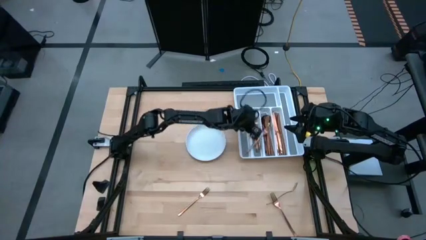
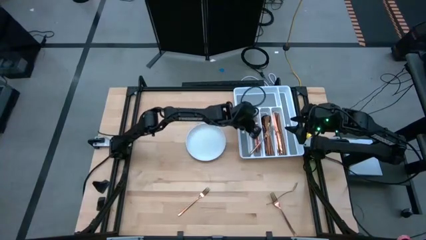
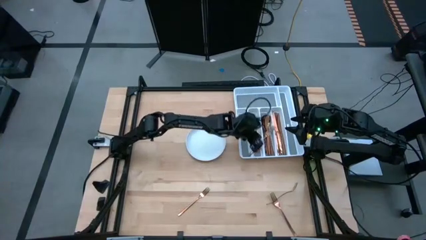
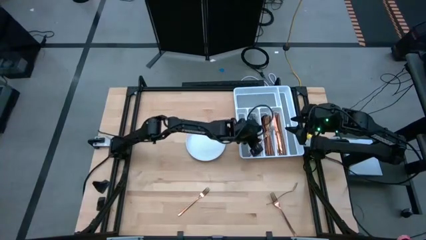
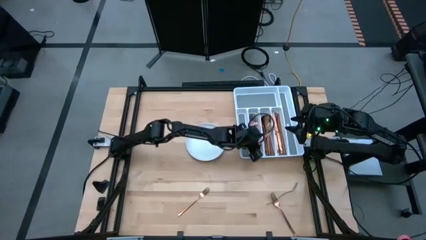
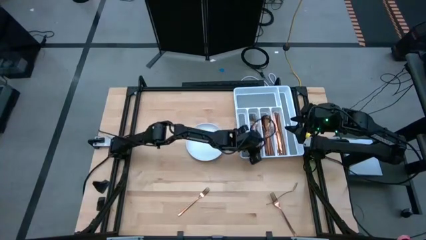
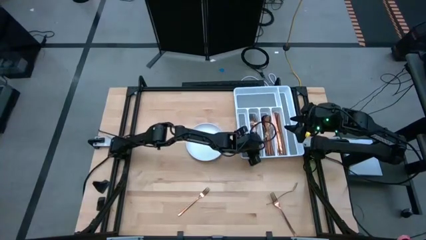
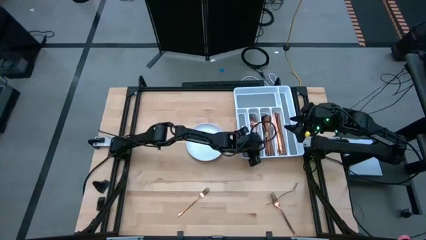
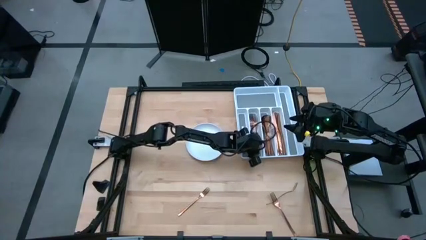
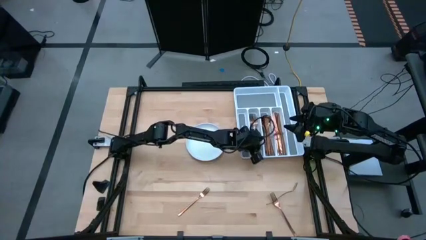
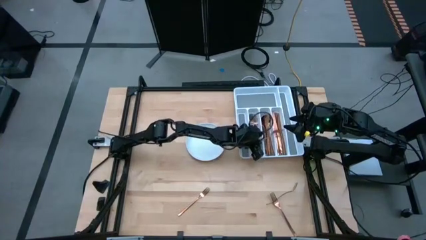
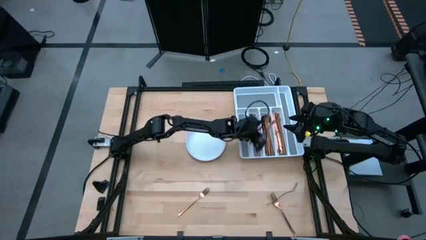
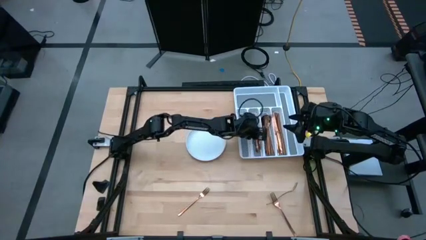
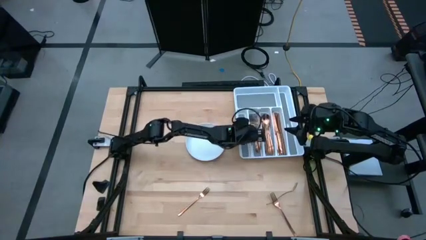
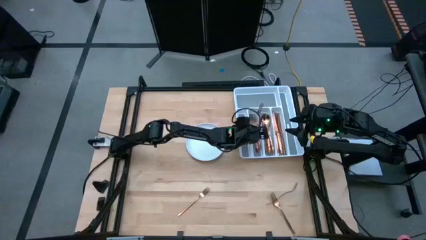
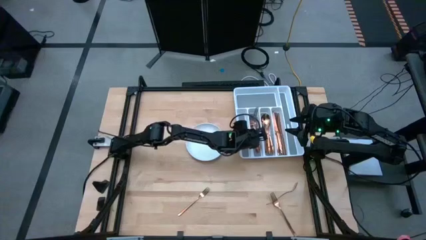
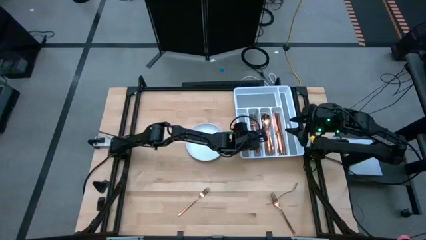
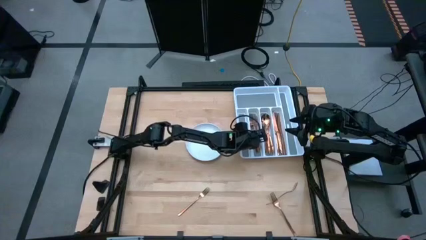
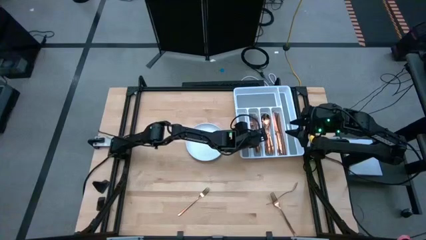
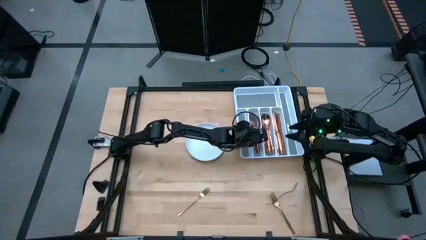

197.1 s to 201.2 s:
Task: Sort silverware
Put the fork in the silverware tray

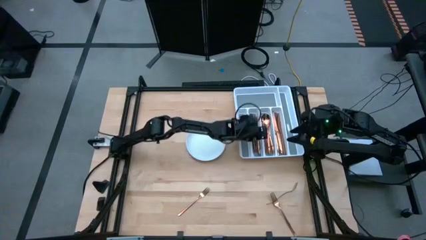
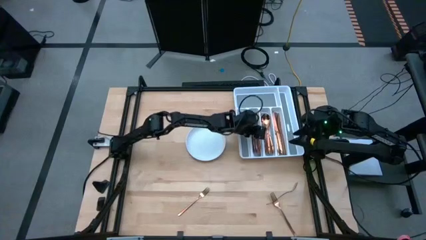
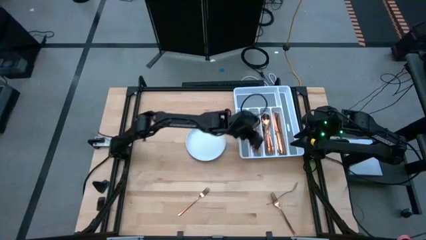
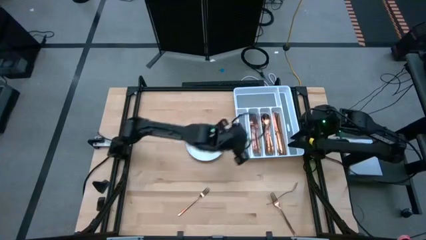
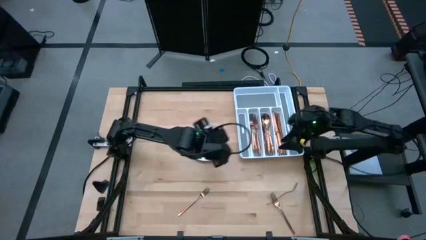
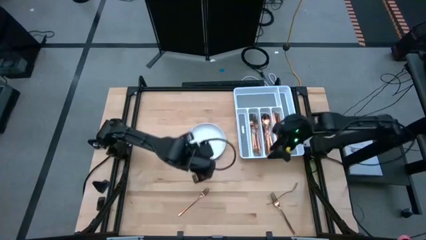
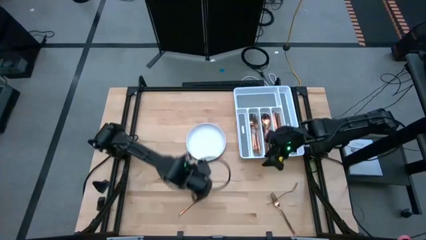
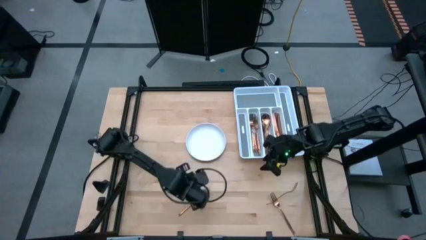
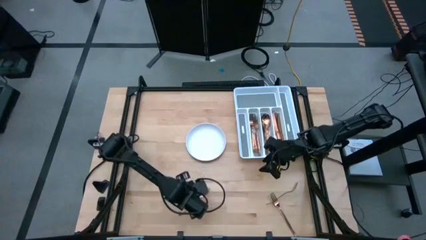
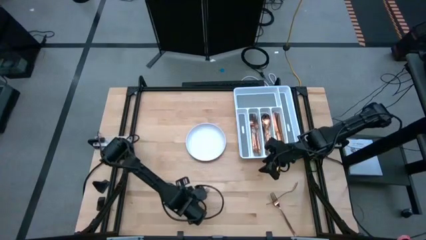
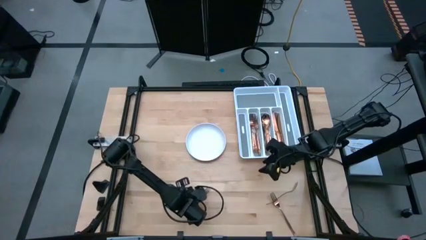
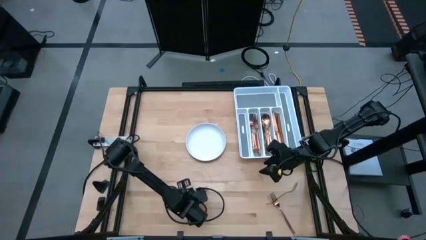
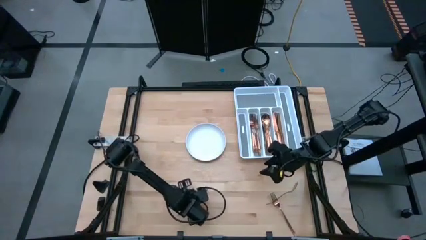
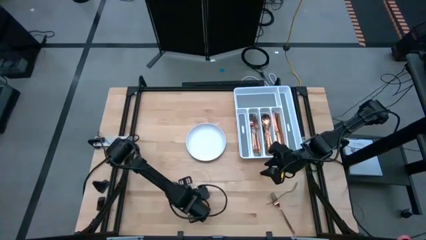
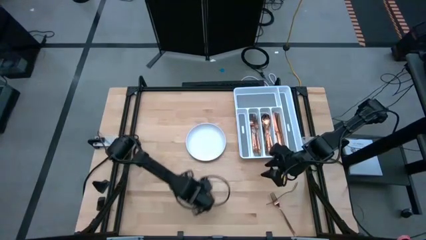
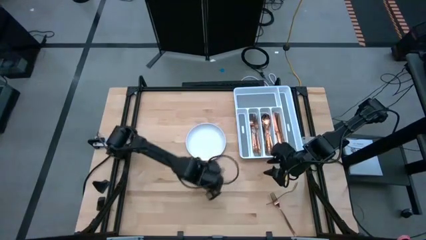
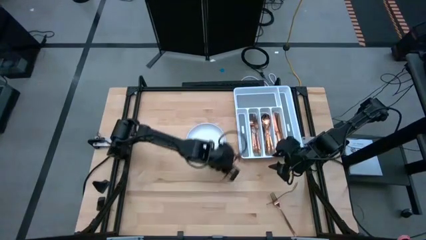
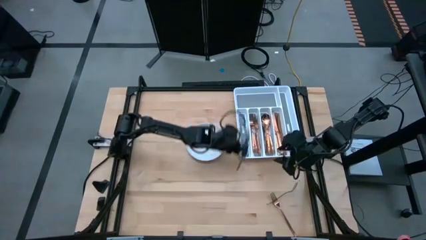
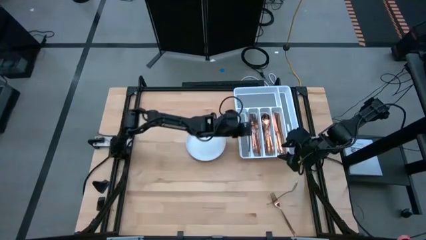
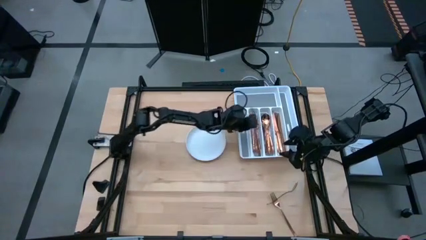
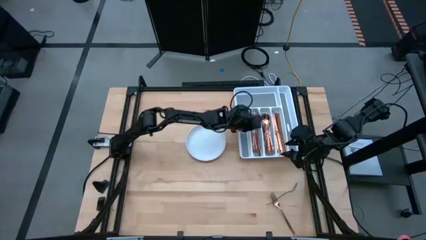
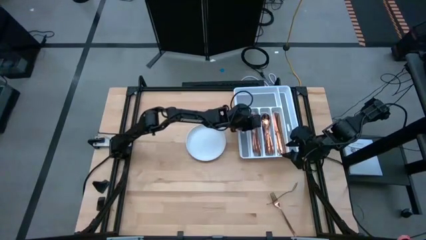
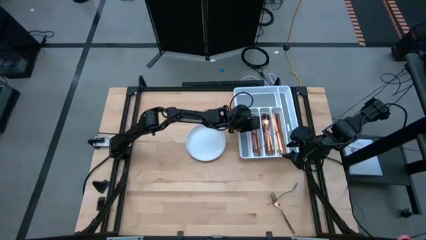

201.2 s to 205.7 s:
Put the top left fork in the silverware tray

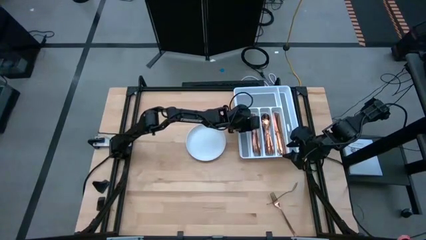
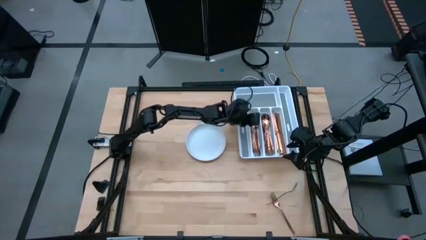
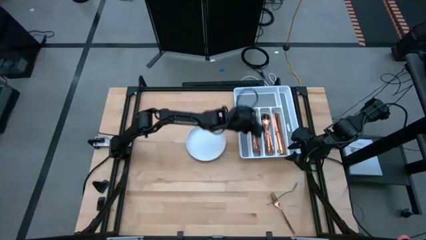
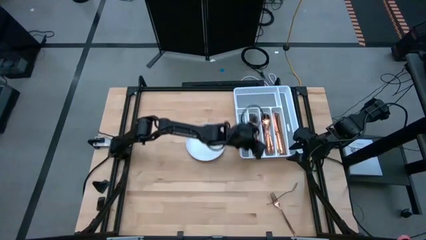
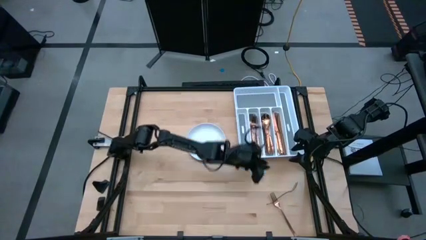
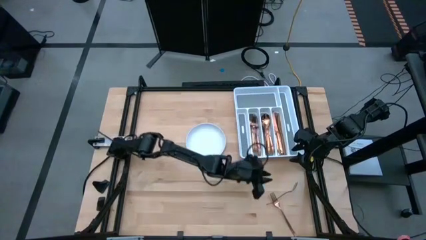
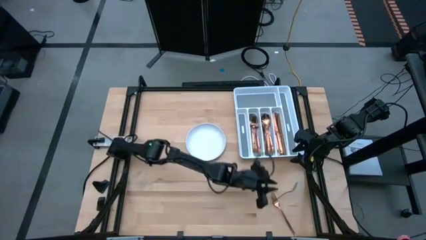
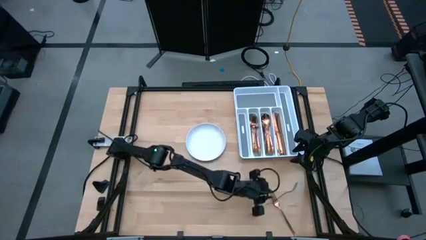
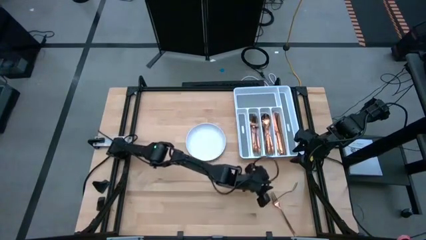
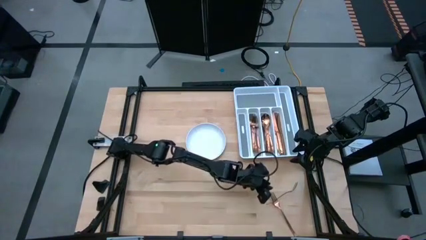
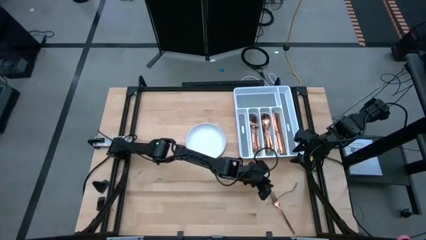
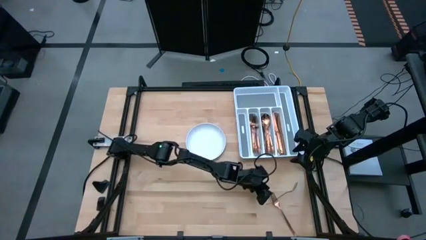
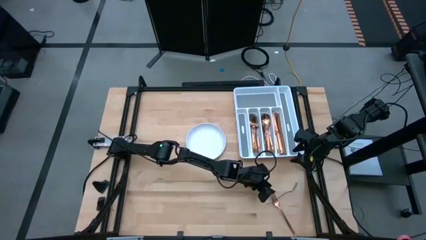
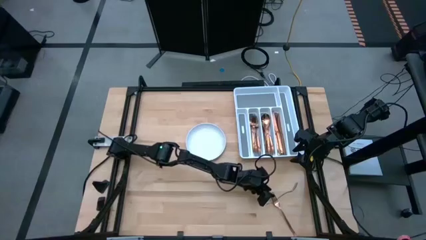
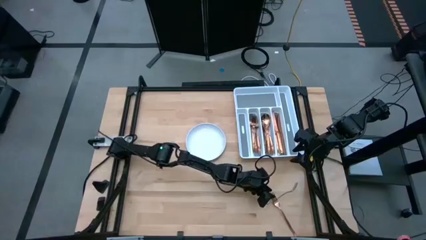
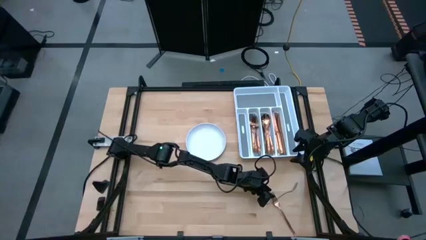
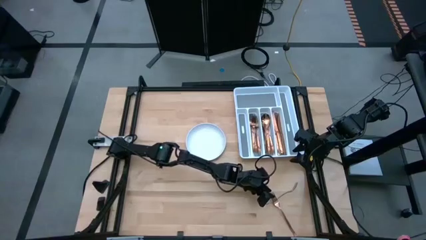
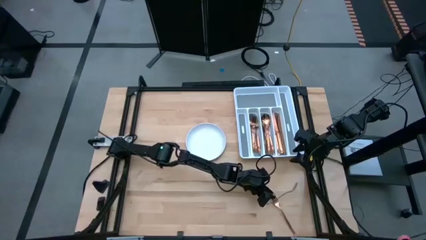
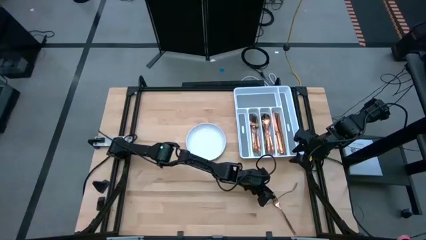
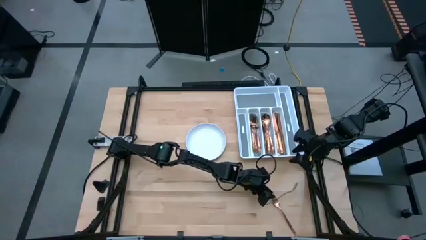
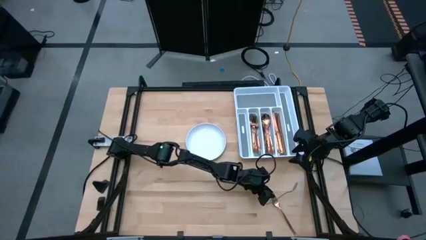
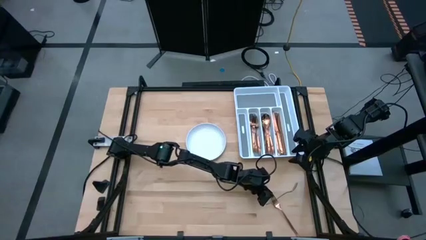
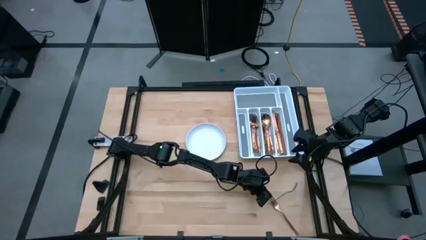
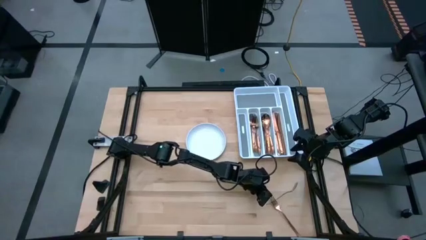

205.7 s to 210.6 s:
Put the bottom fork in the silverware tray

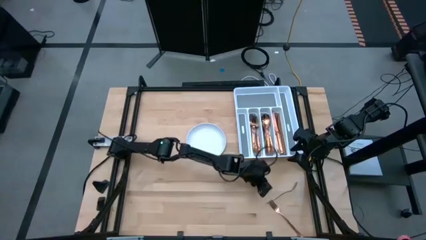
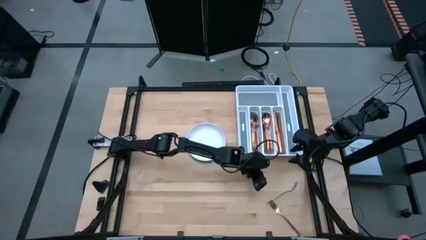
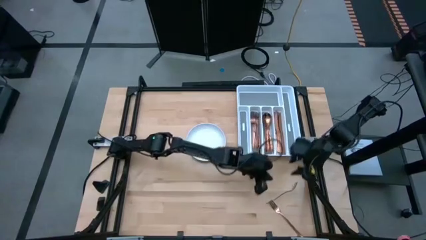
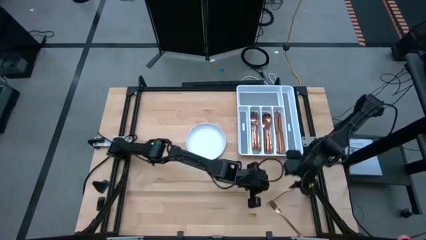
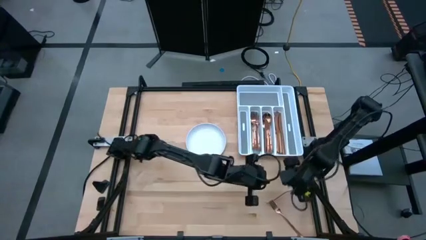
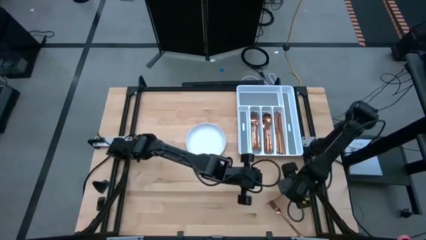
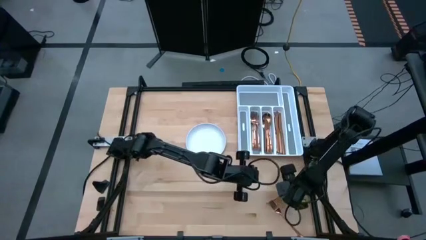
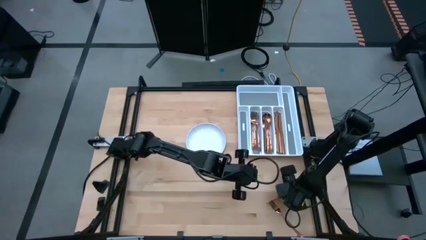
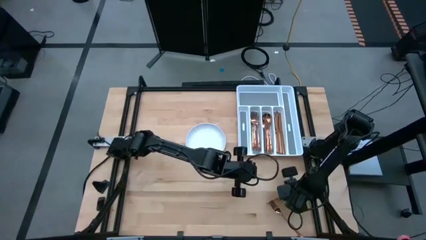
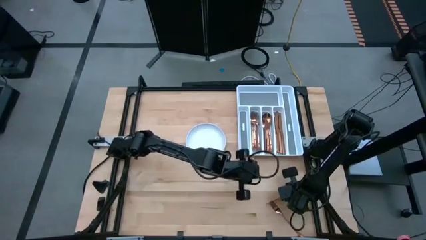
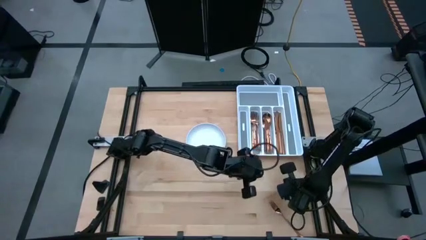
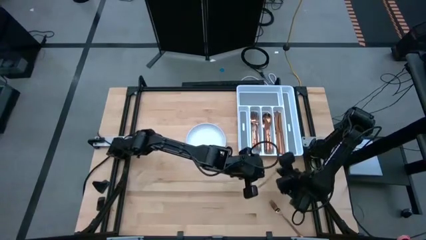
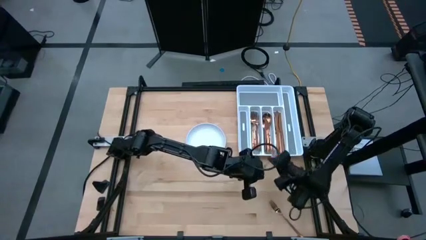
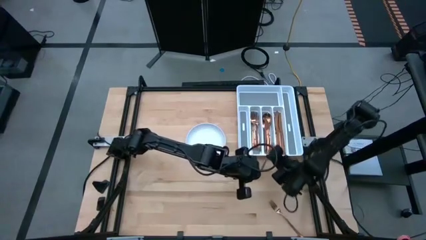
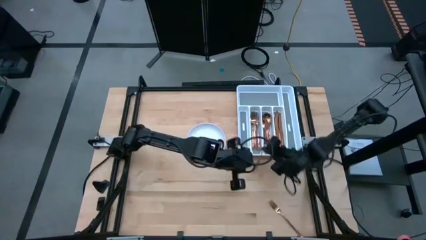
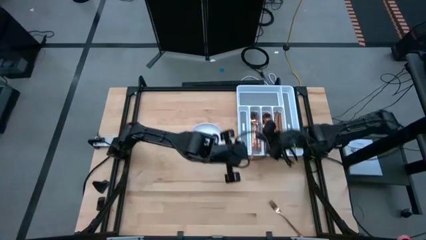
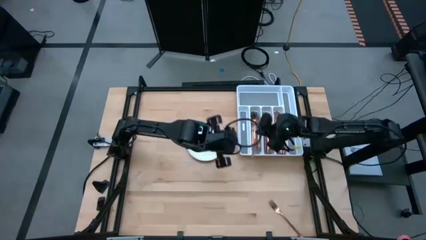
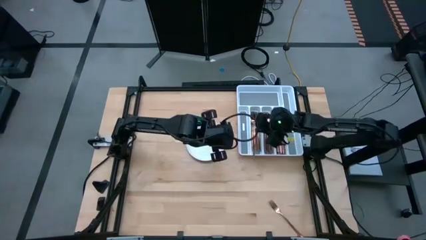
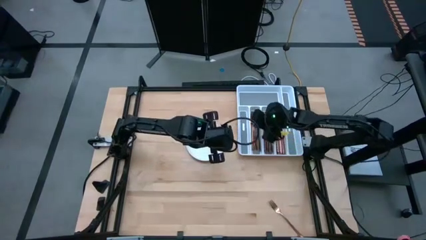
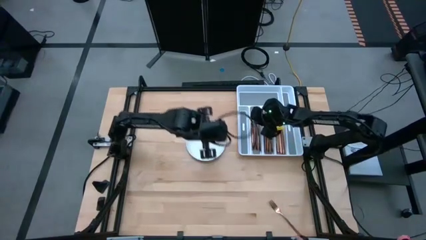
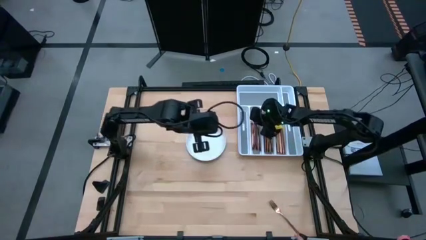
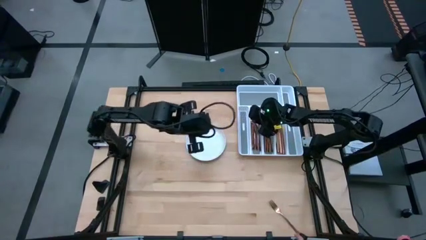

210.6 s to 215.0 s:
Put the top fork in the silverware tray
